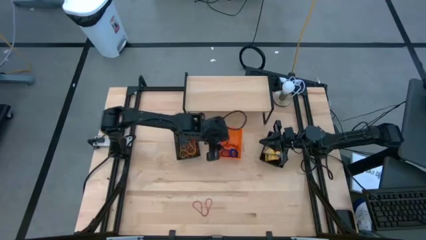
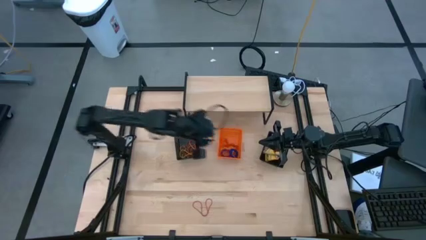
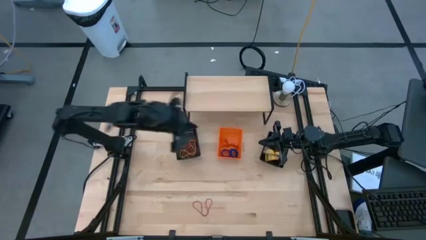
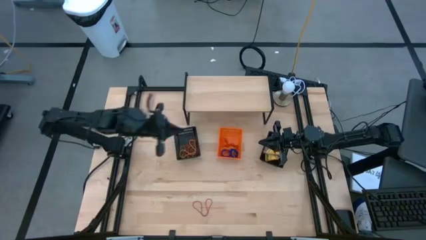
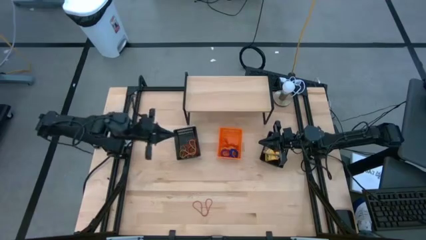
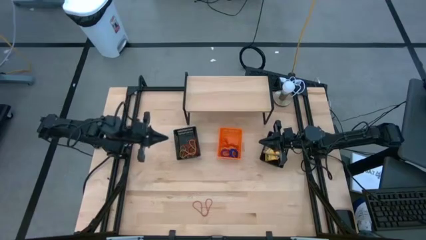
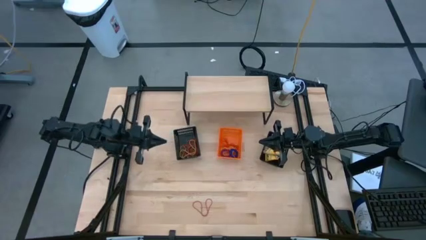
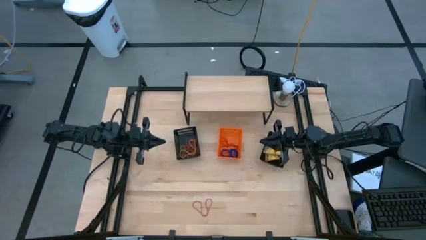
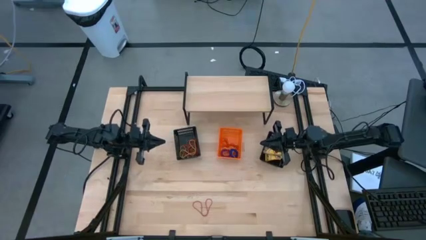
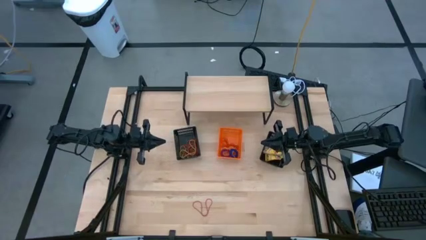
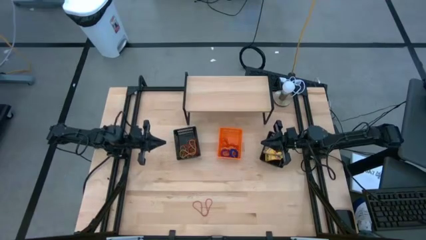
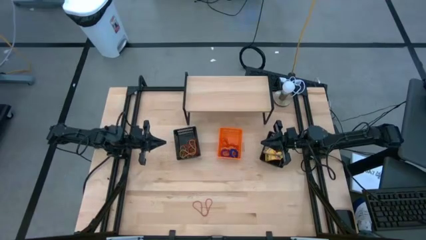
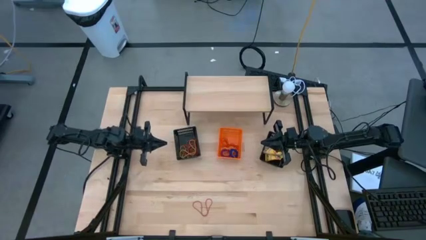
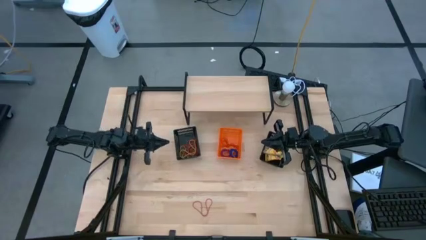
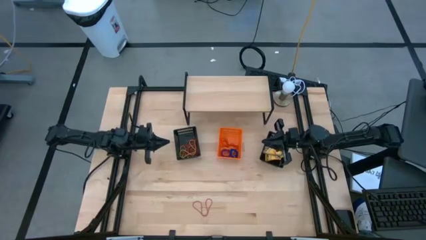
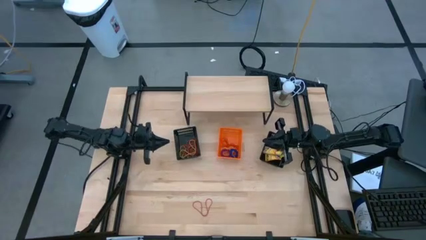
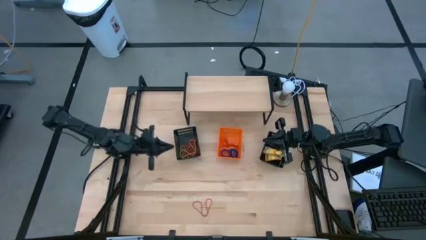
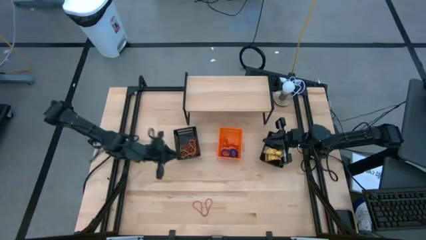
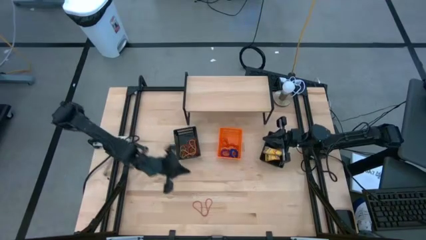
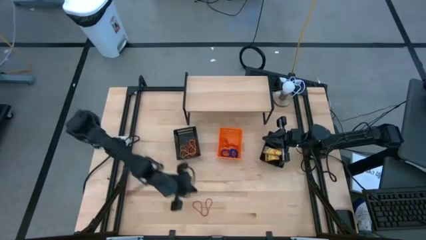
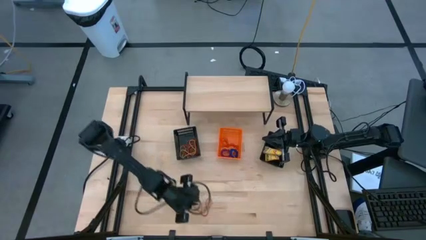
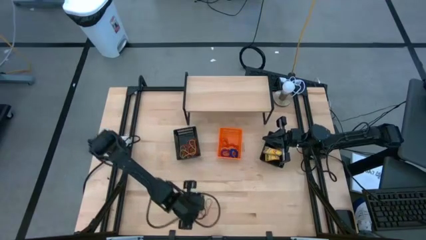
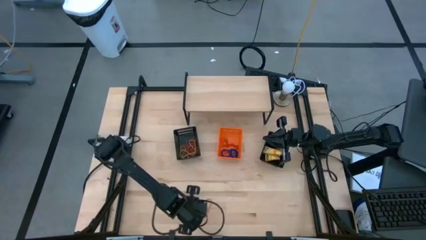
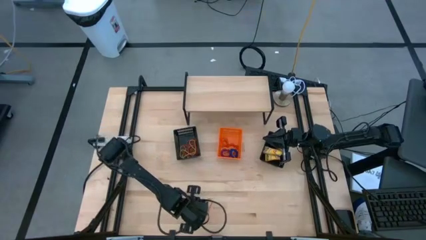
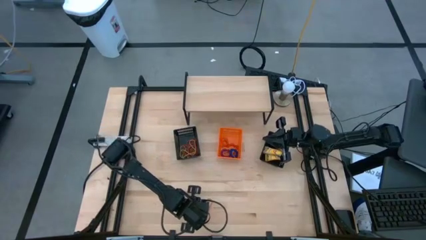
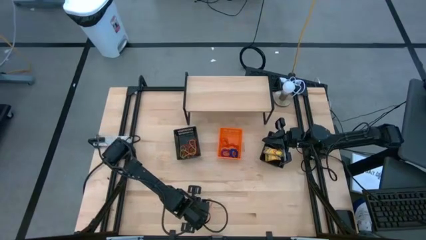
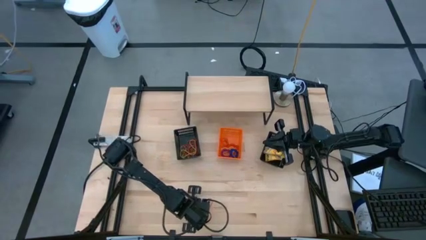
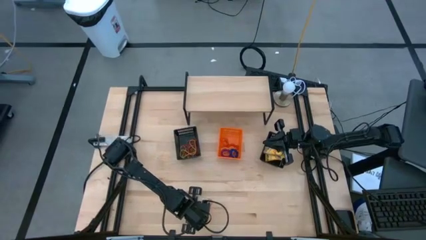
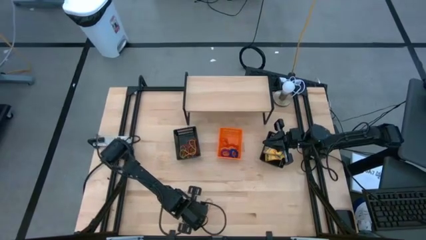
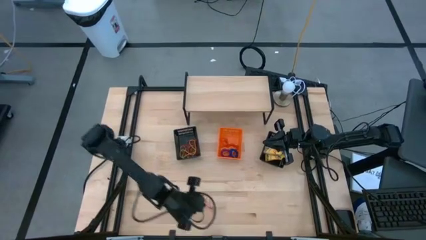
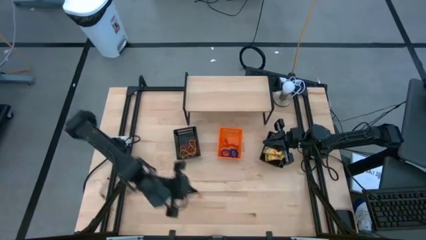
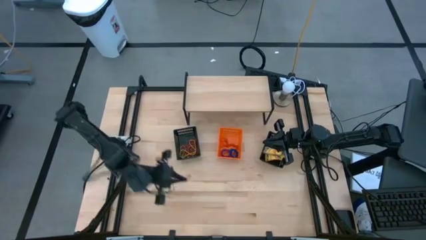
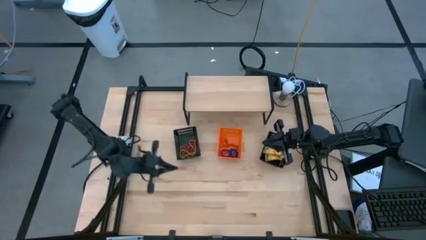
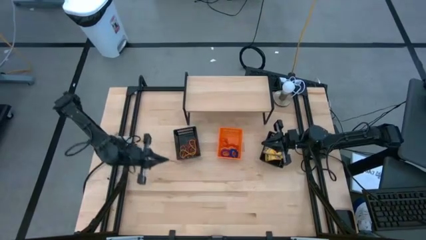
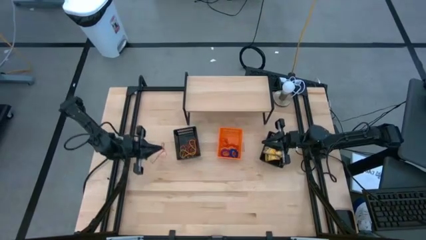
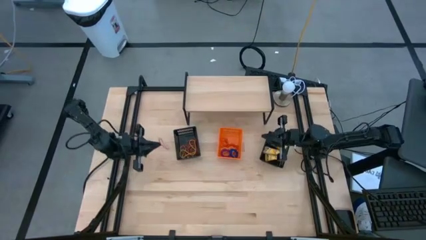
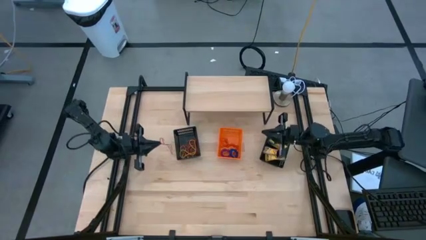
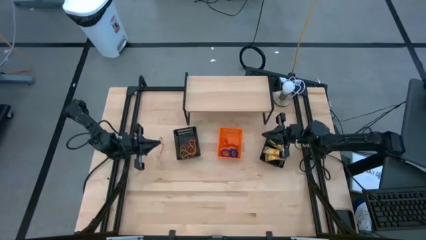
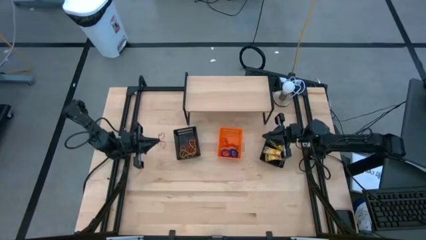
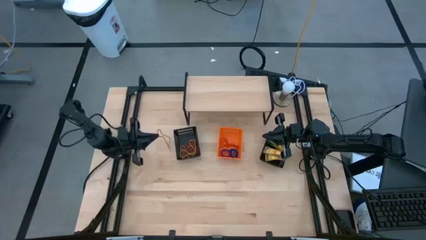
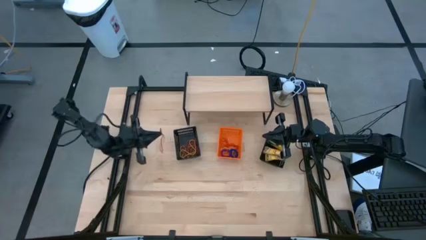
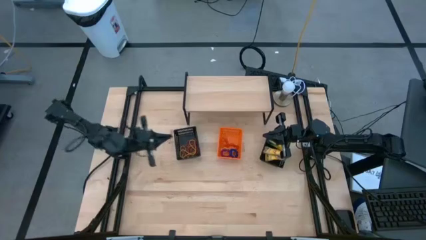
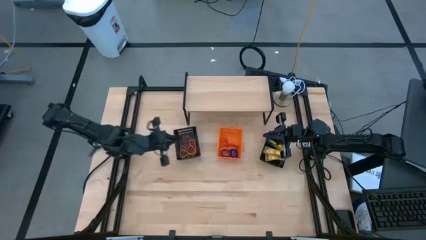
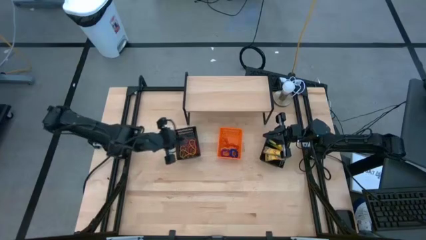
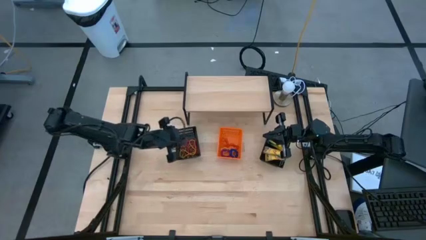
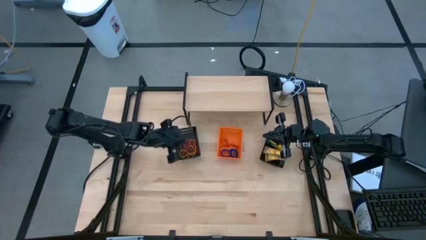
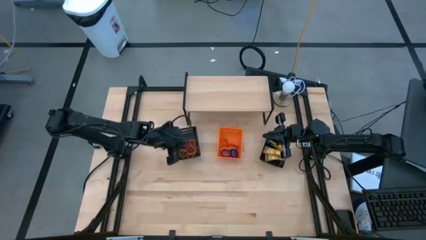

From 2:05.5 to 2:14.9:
Task: Pick & Place Office Desk Supplies
Put the red rubber band into the left black bin

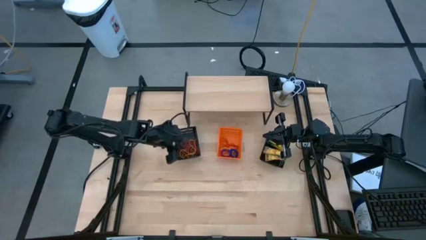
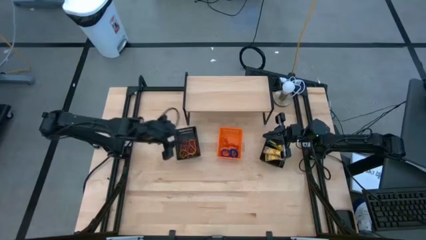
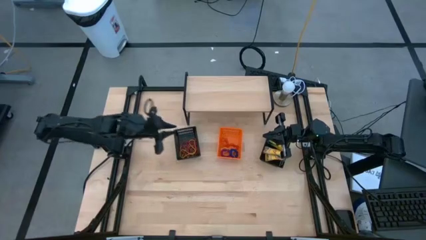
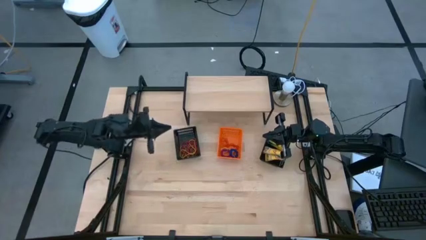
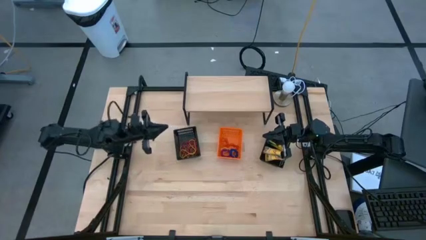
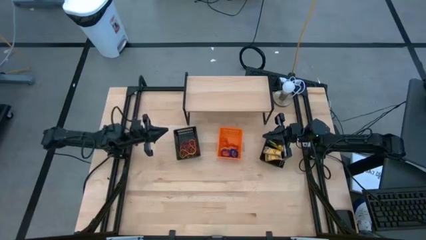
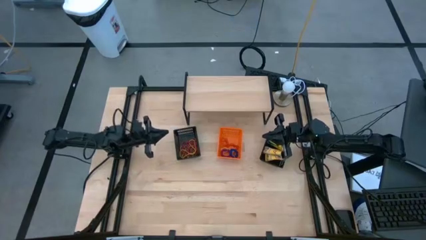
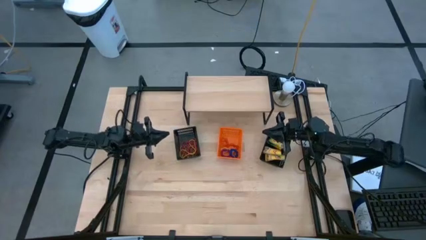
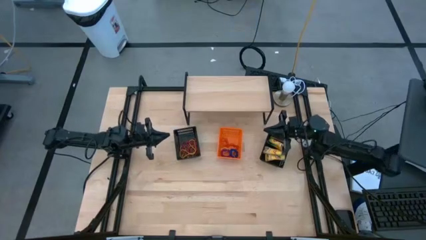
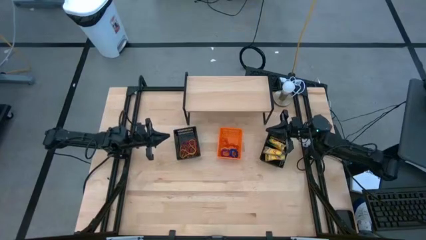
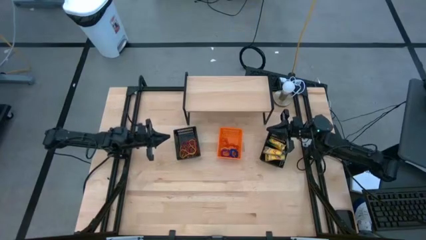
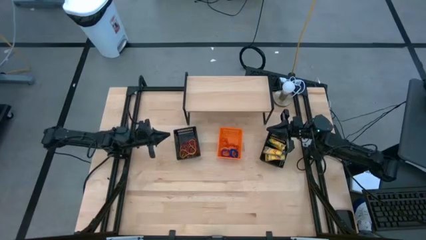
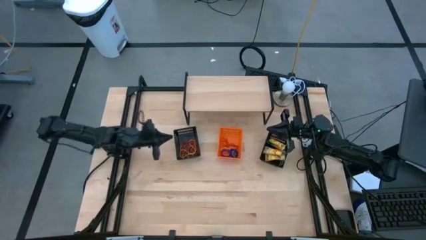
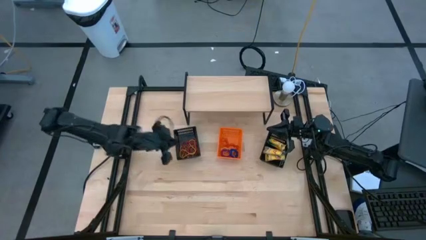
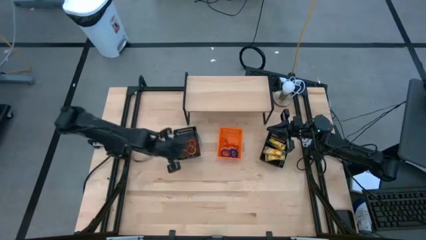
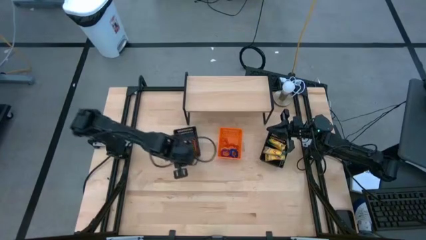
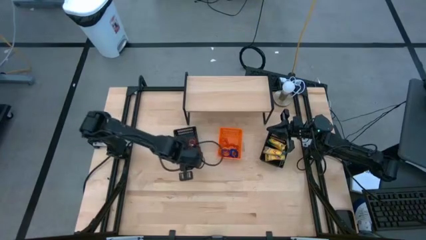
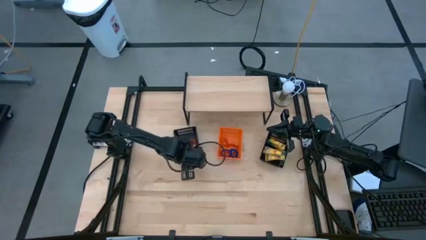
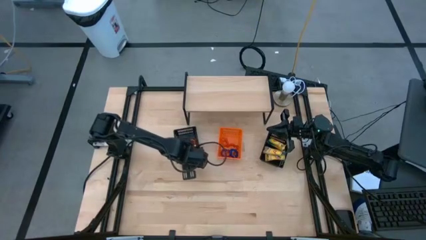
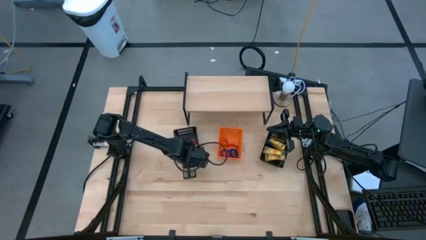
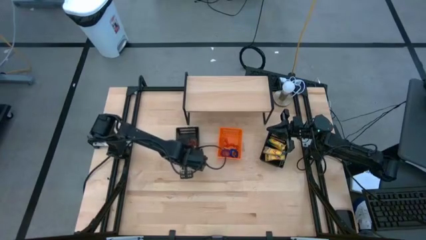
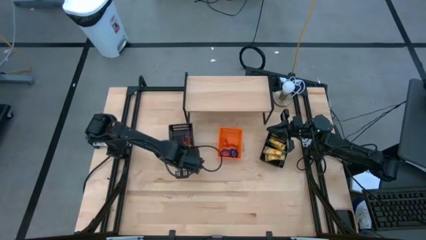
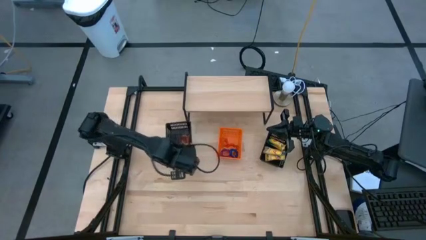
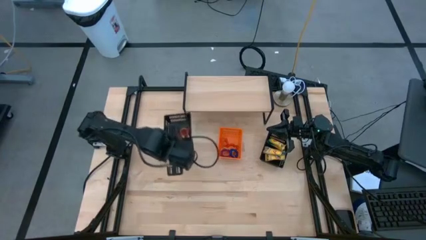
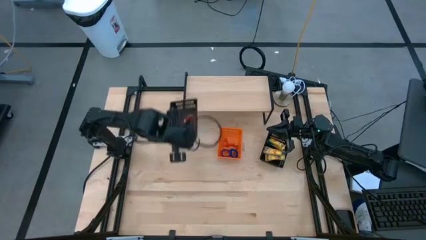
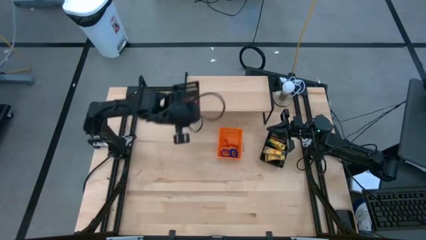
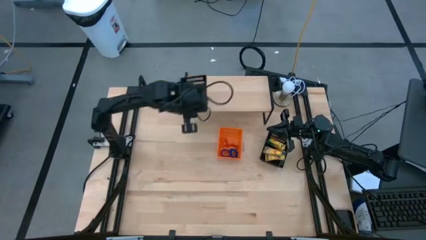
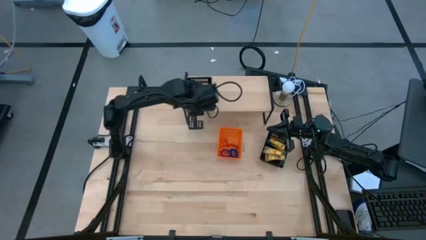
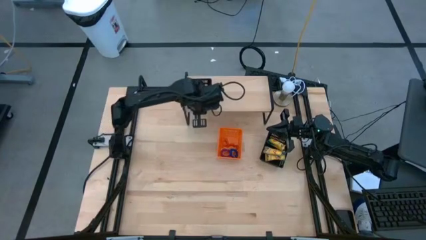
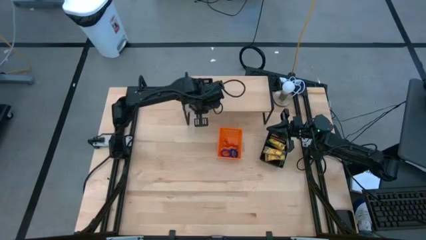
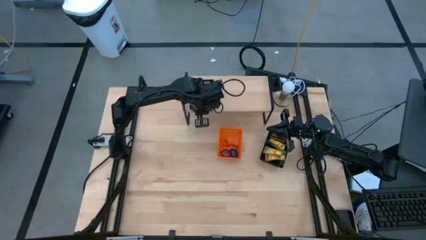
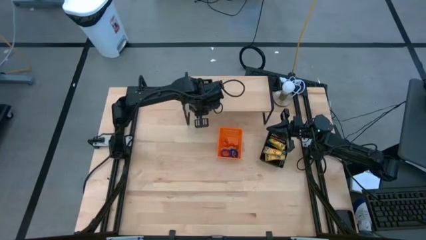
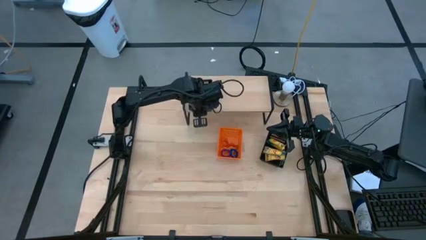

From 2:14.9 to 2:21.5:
Put the left black bin on the shelf
